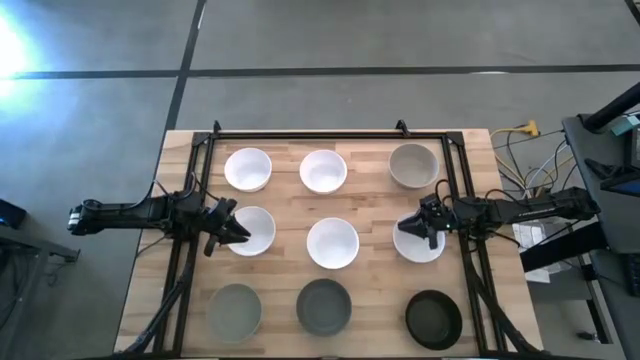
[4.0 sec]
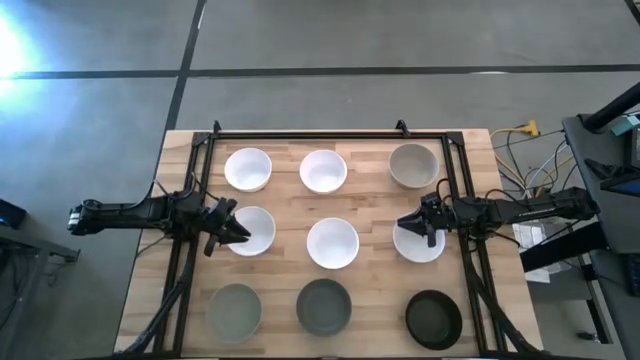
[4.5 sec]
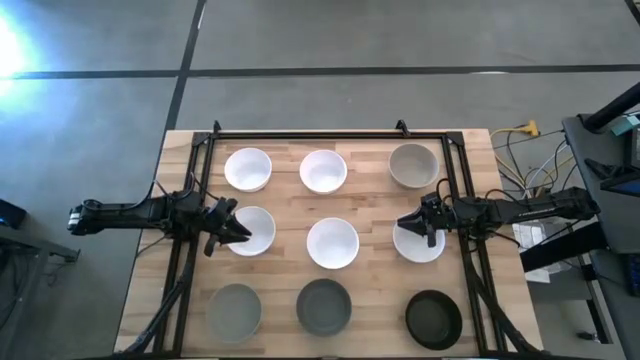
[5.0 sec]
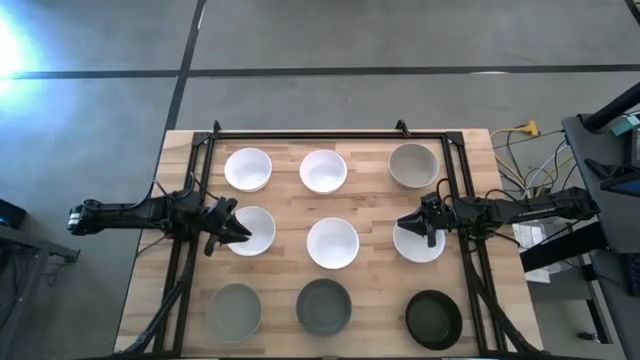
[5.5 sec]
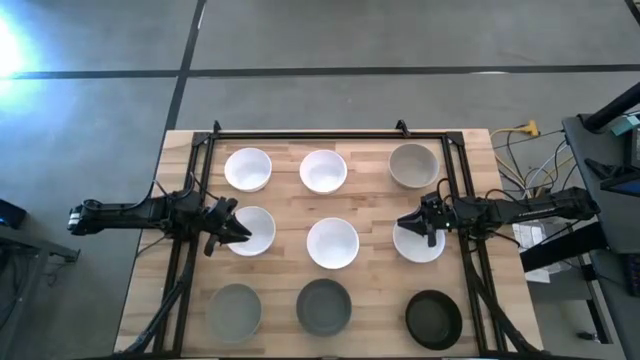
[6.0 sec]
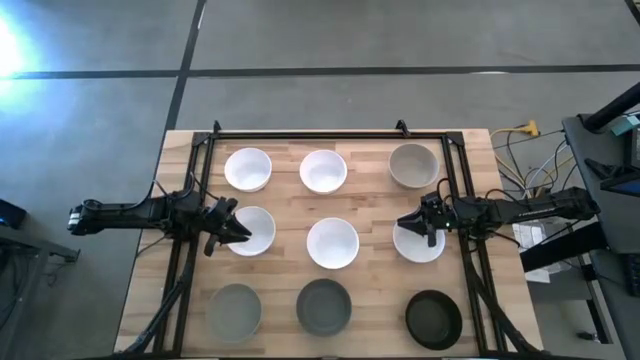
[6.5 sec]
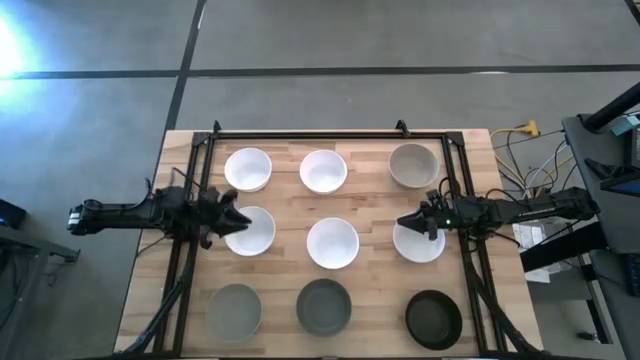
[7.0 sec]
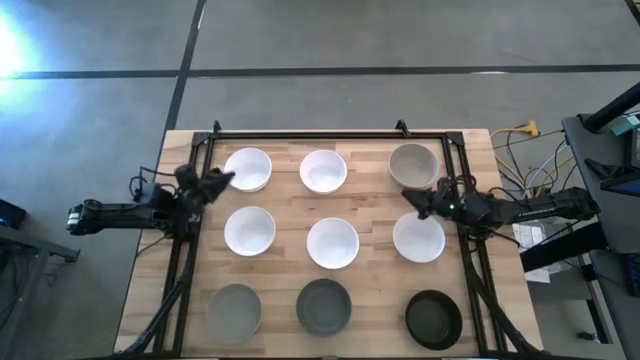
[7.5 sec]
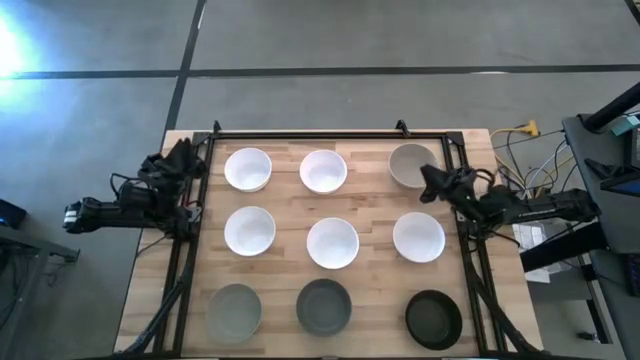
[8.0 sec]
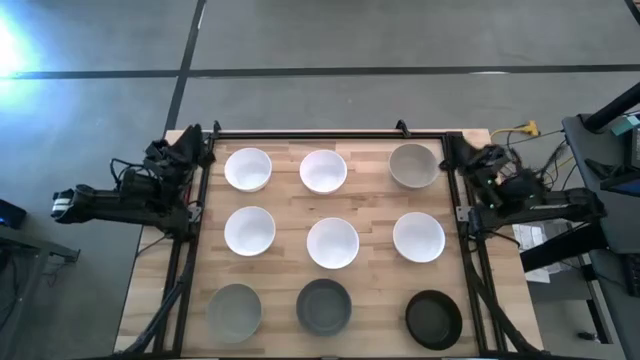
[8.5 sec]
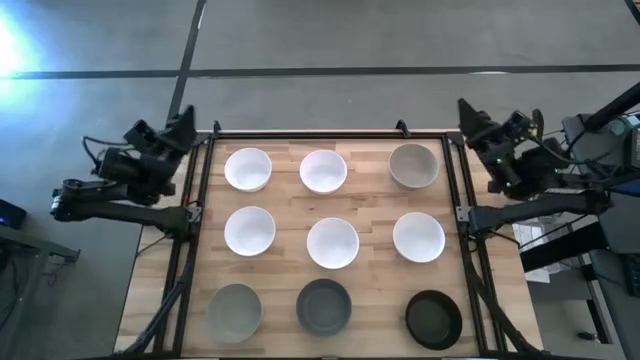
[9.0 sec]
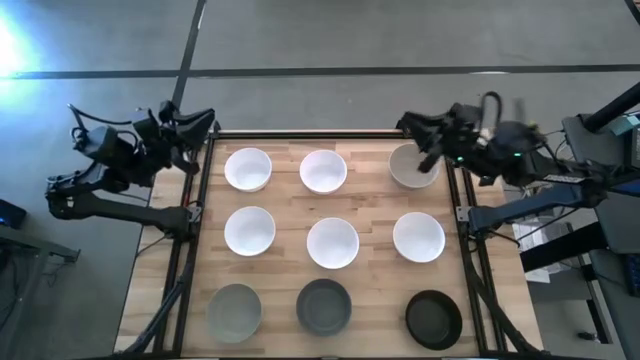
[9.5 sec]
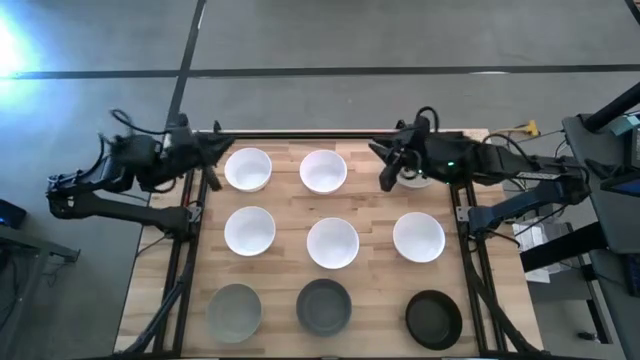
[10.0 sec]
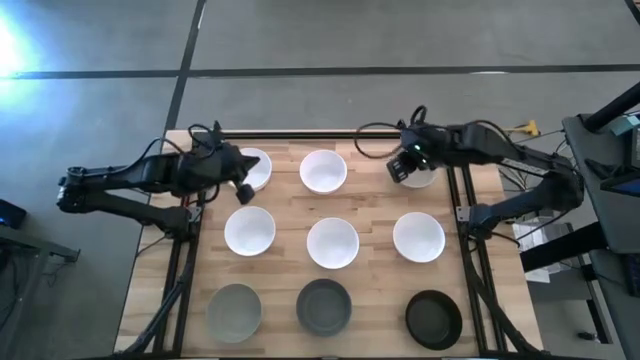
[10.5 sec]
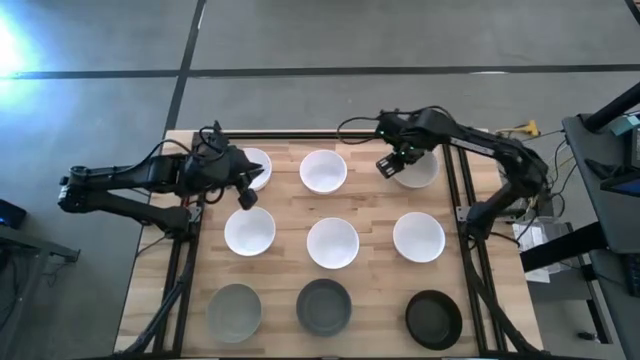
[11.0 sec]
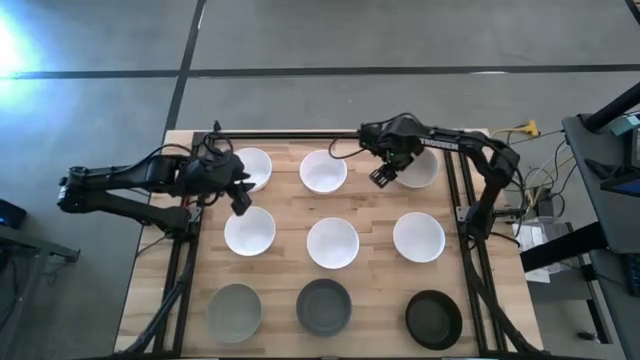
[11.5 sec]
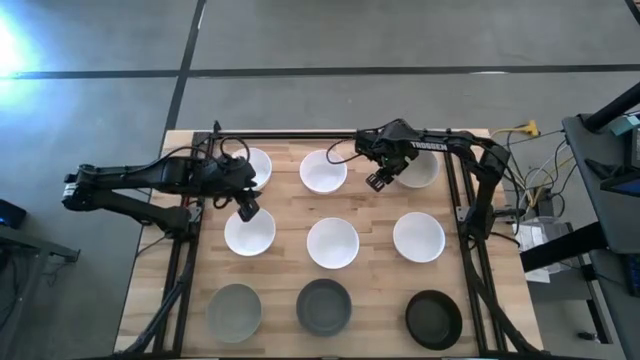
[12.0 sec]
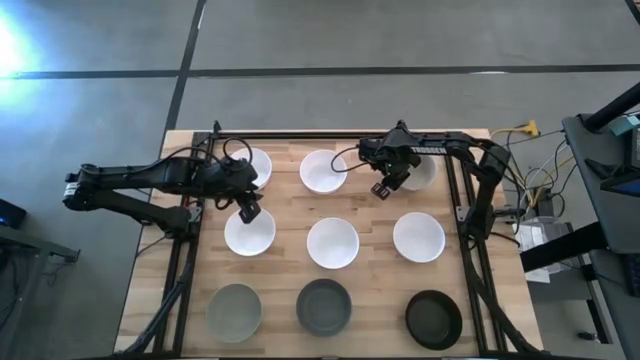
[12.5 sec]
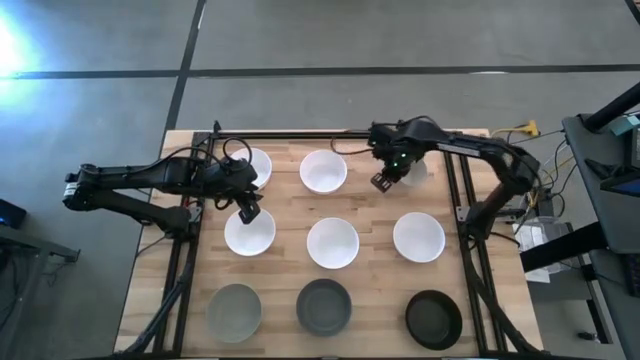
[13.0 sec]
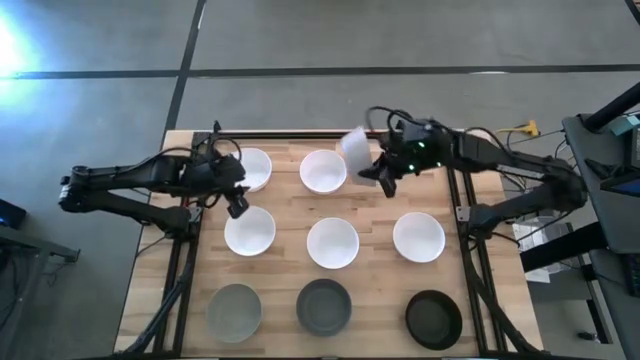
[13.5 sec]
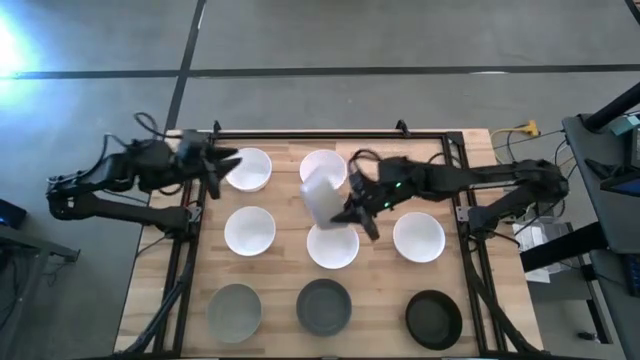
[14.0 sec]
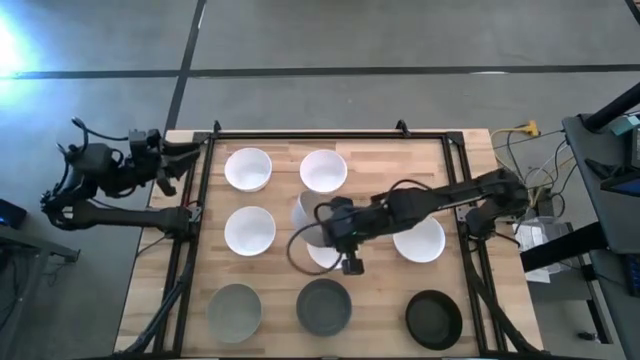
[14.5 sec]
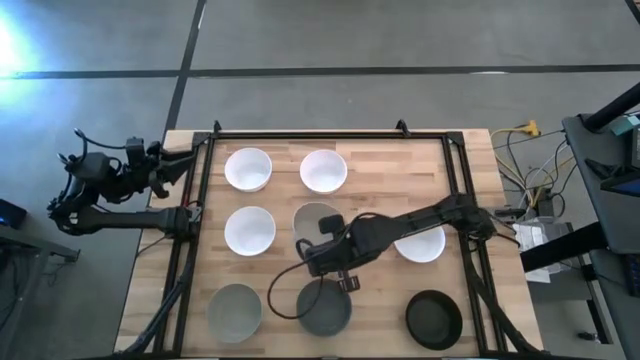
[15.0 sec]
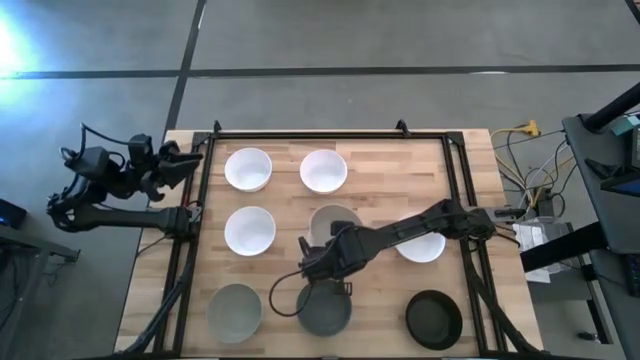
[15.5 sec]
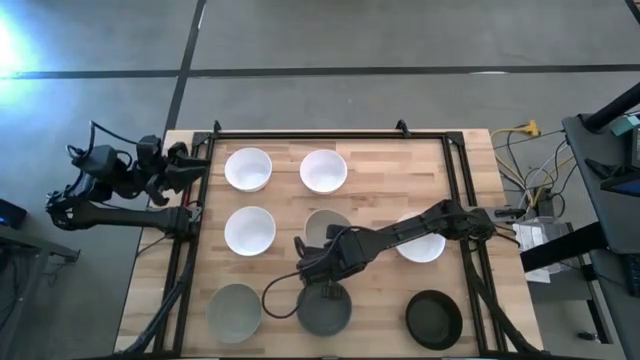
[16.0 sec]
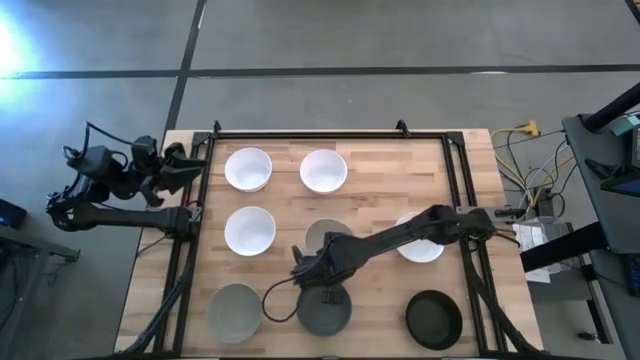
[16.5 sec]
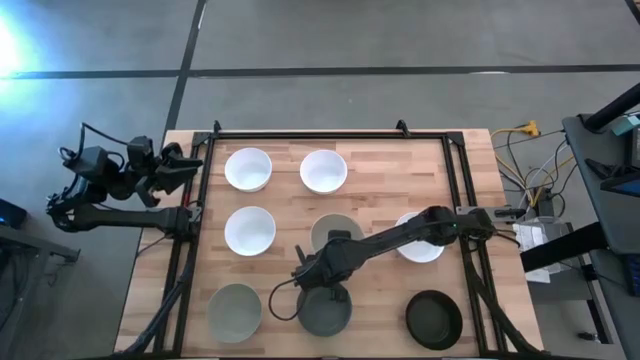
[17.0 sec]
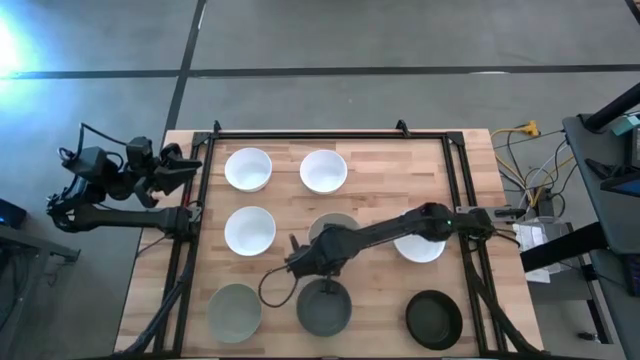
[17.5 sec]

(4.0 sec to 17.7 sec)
Task: Nest bowls inside each other
Stack the light gray bowl on top of the white bowl

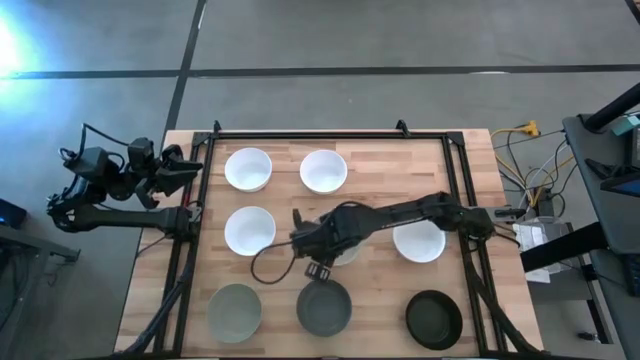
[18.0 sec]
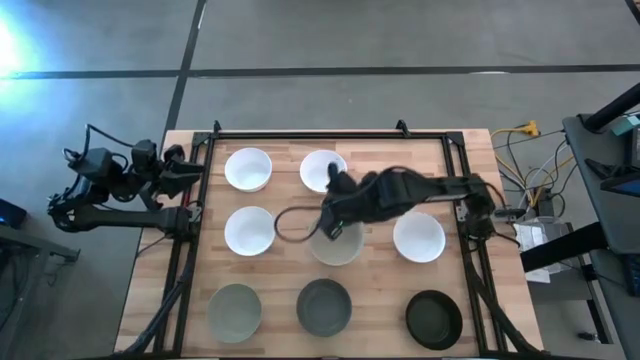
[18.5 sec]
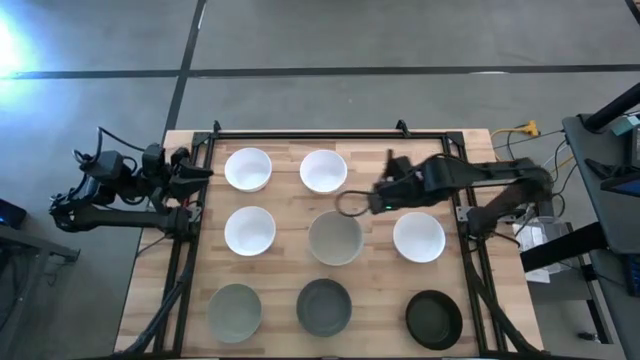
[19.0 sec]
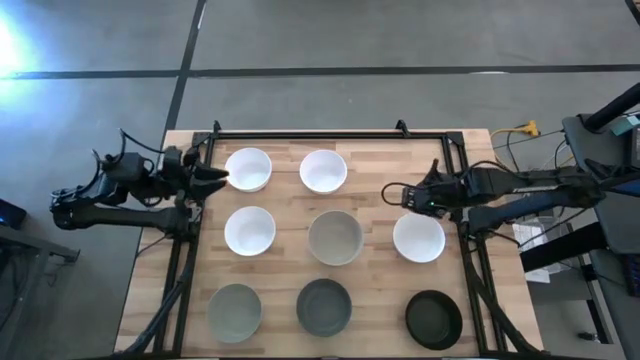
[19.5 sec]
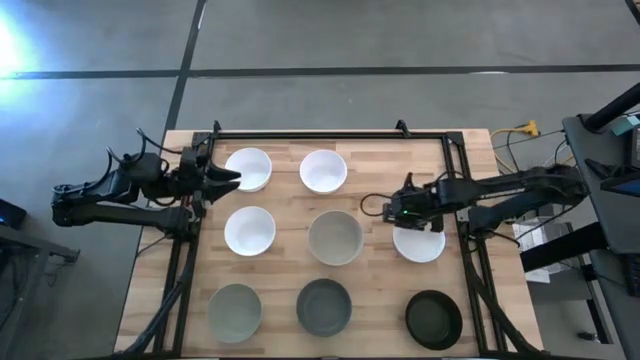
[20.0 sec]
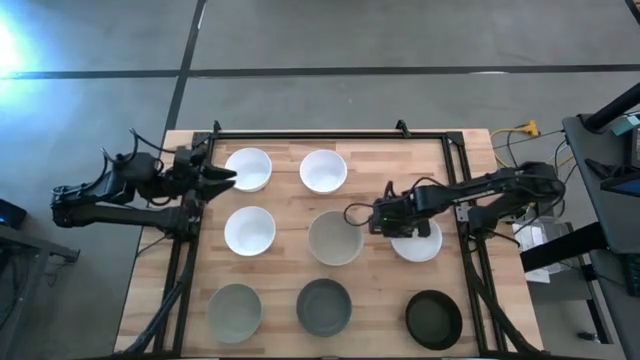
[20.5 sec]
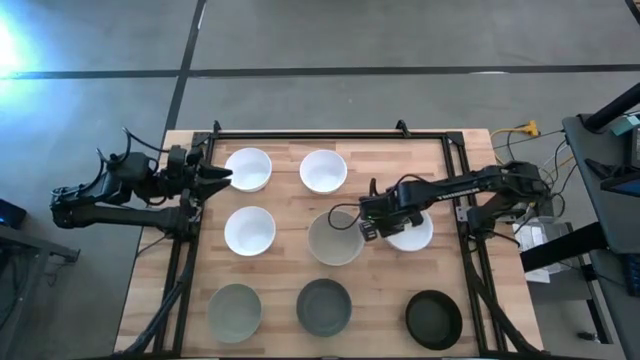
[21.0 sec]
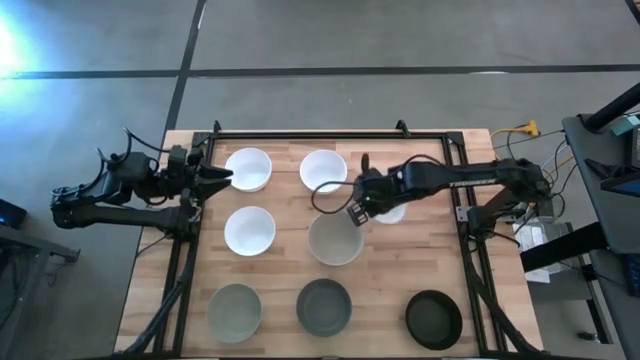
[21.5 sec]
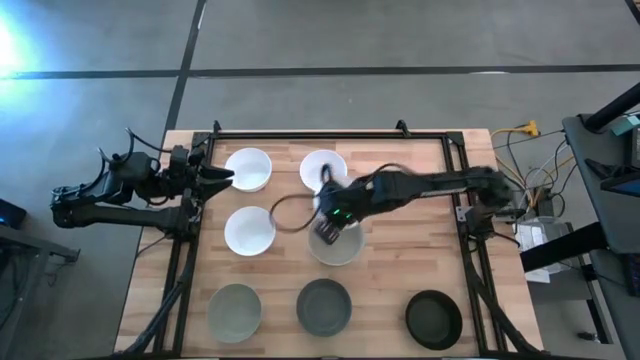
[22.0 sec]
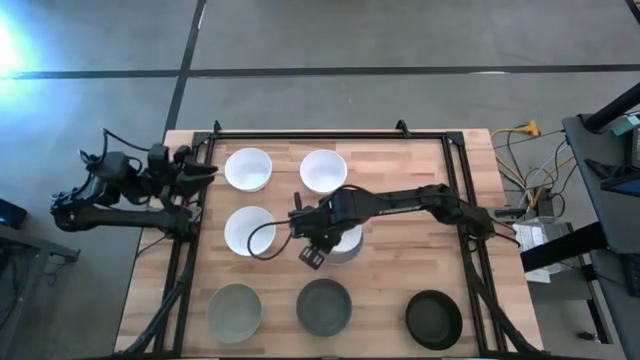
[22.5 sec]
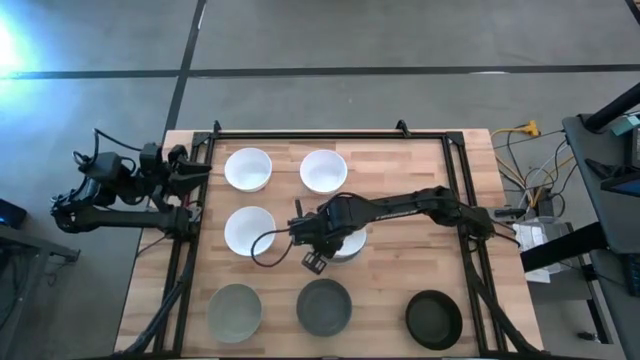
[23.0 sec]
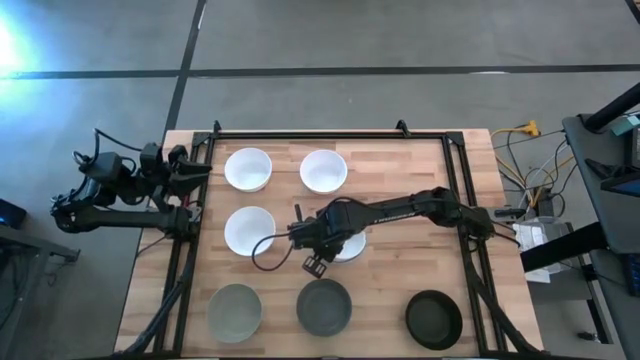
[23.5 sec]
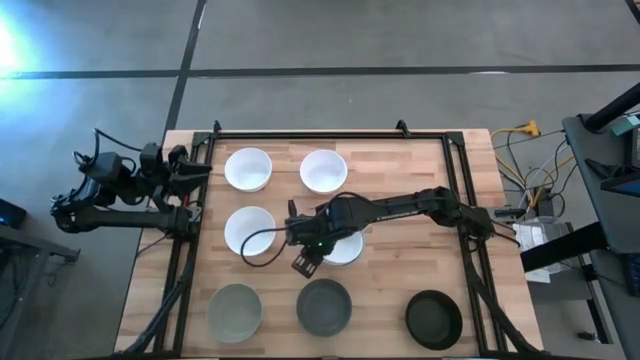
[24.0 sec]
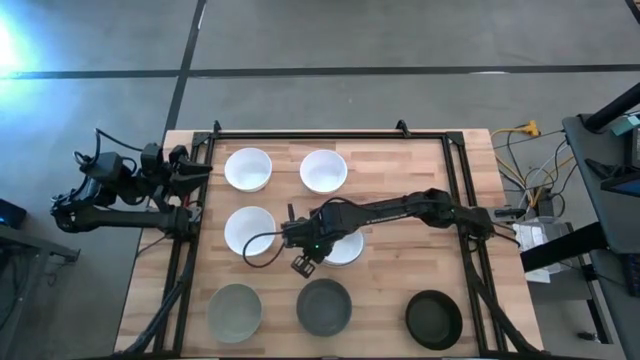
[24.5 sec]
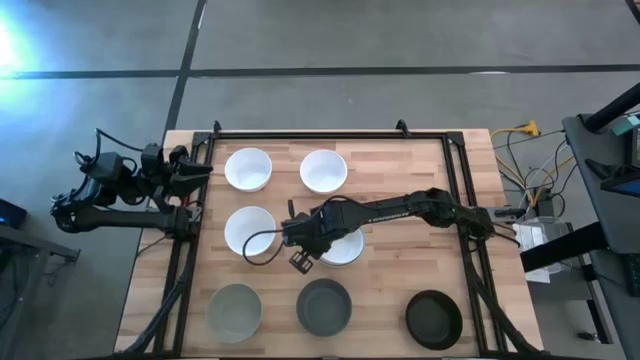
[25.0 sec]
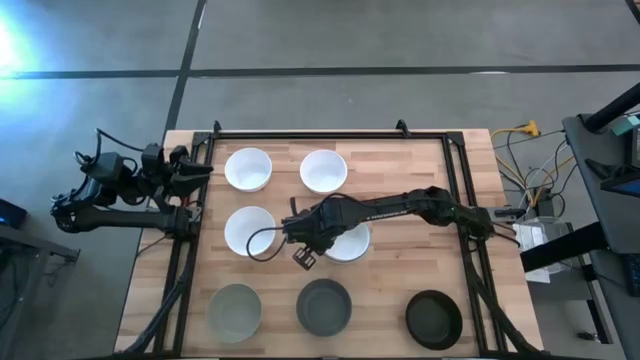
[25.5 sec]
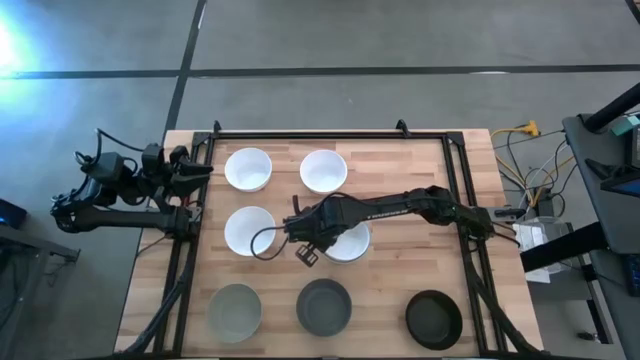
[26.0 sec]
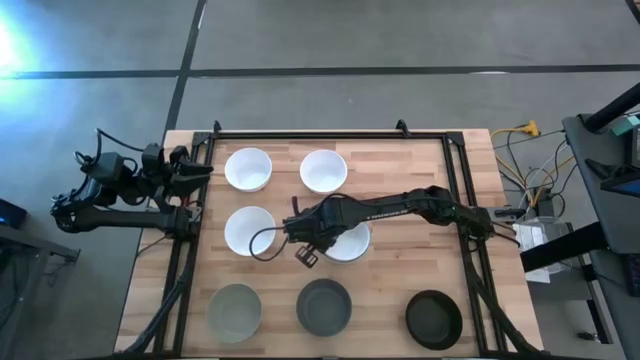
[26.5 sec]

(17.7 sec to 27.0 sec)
Stack the white bowl on top of the light gray bowl
